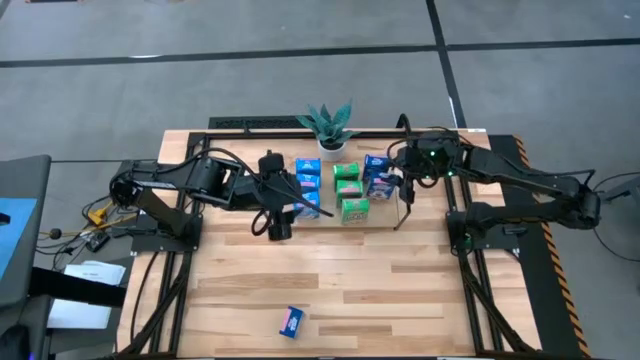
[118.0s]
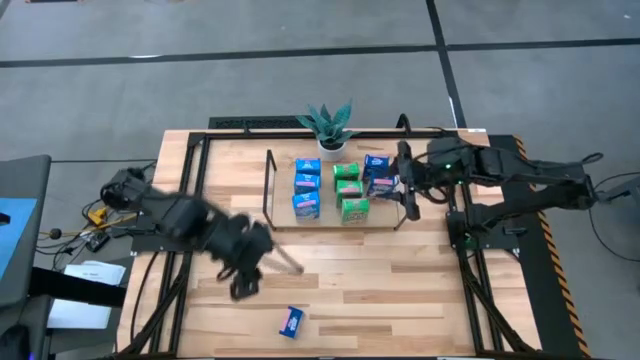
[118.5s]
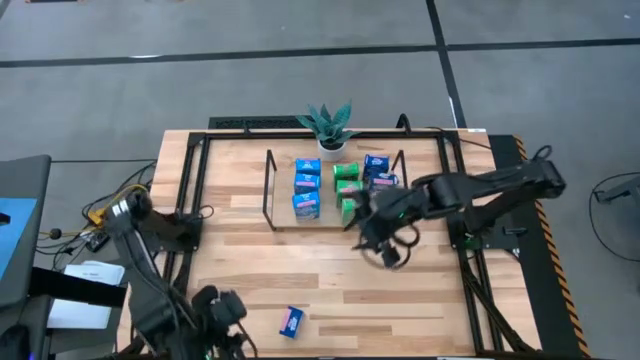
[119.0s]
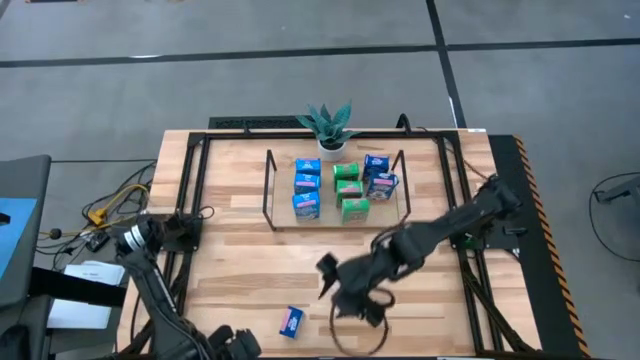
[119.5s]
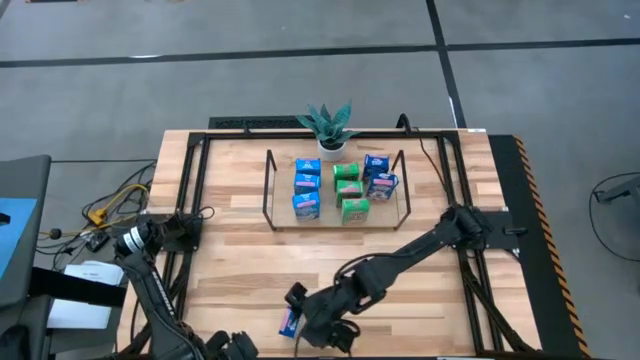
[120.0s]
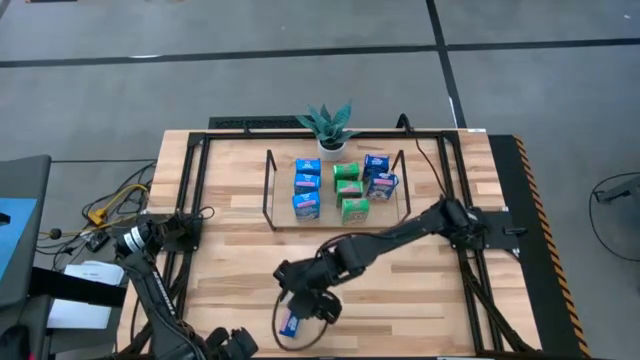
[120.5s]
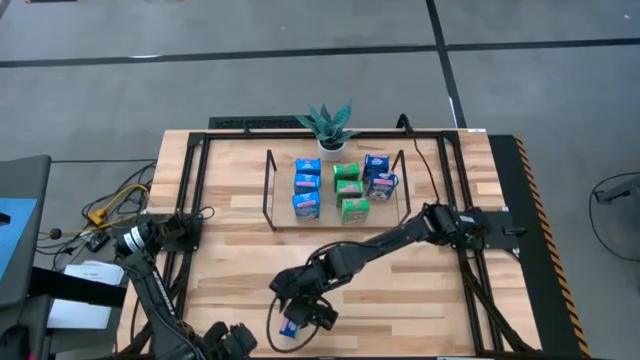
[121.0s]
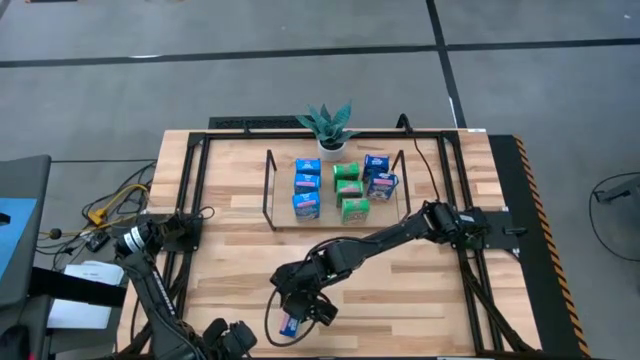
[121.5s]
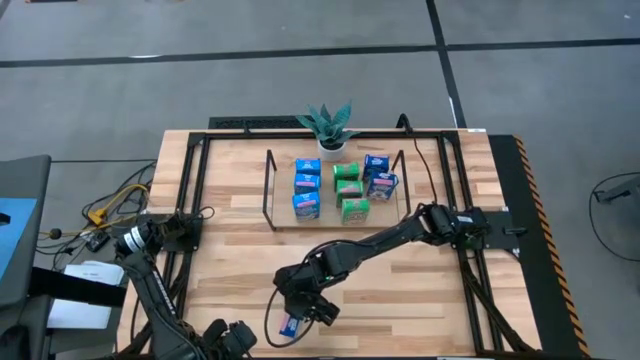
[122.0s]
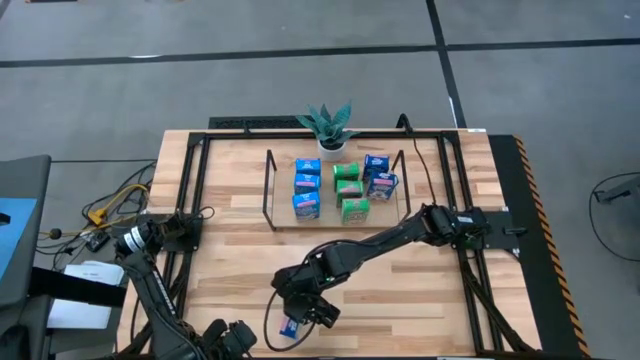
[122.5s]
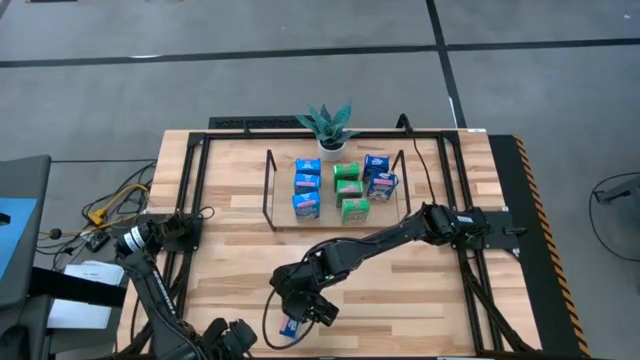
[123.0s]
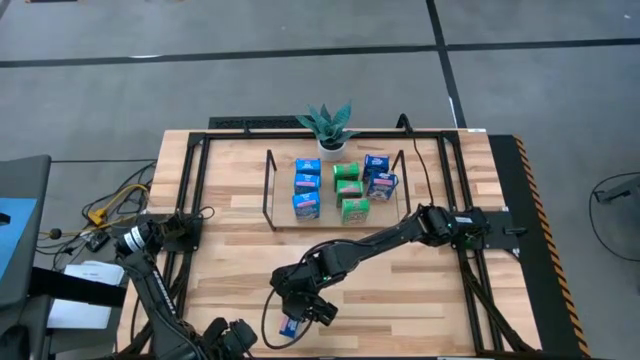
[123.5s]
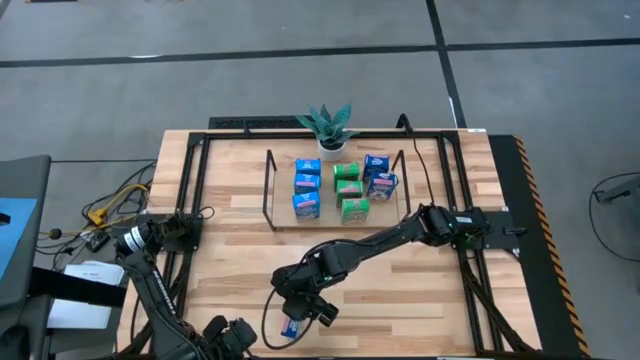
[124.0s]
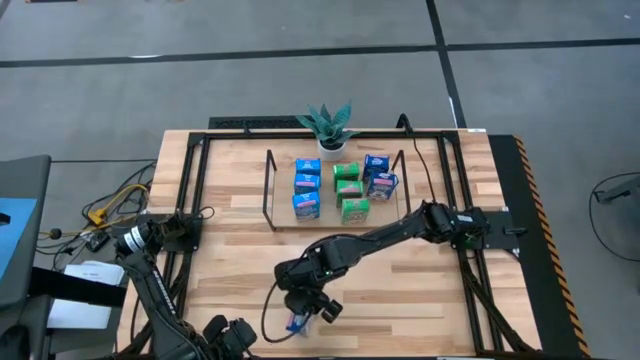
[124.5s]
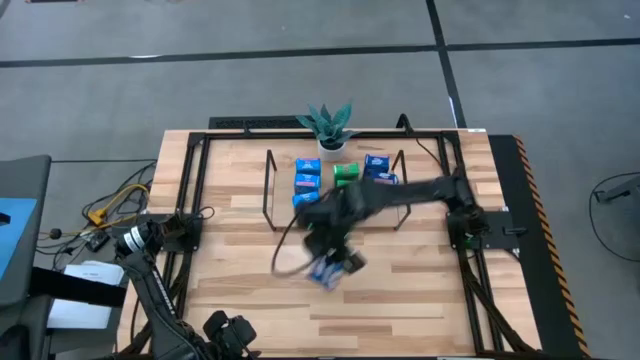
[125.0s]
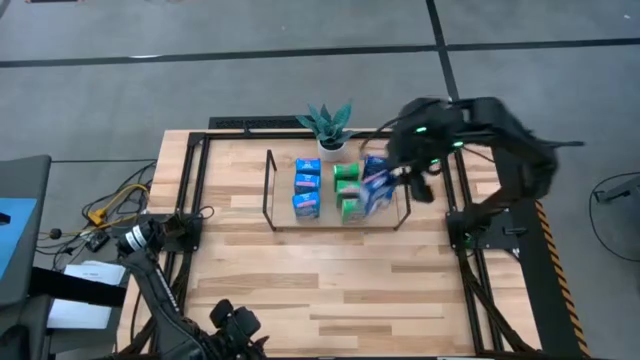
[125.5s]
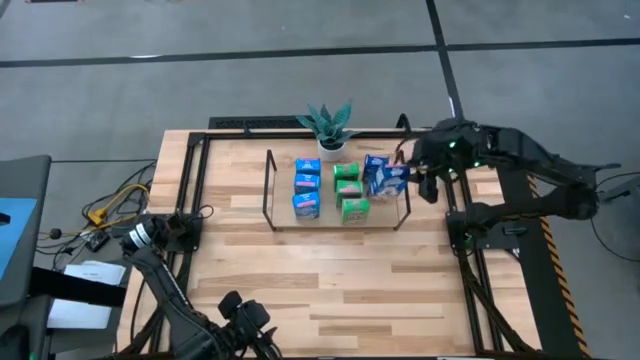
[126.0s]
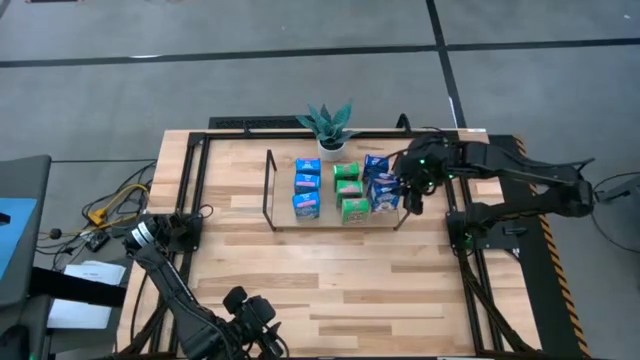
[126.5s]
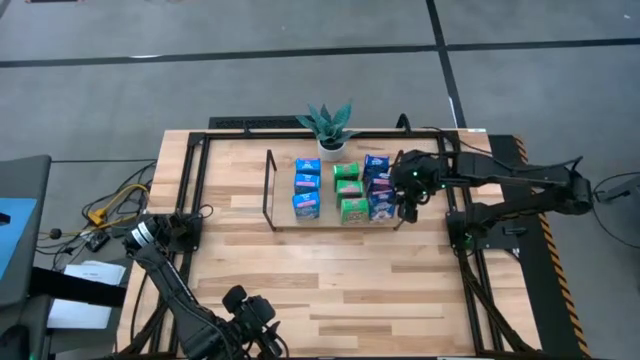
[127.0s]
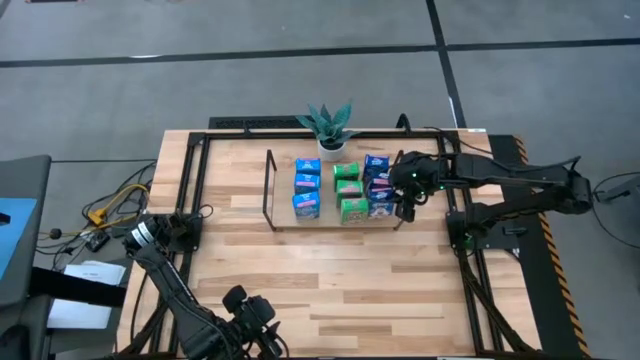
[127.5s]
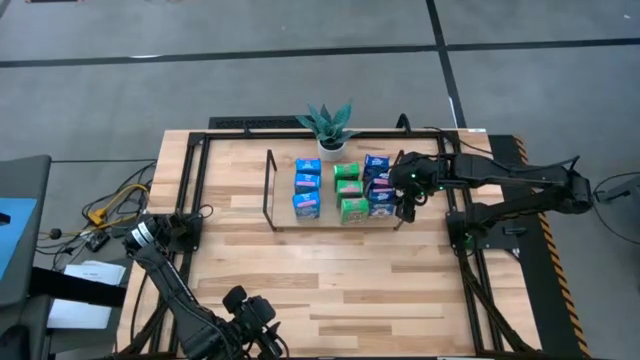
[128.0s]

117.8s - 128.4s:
Task: Stack cereal on shelf
Put the blue cereal box on the shelf aligned with the other blue cereal boxes

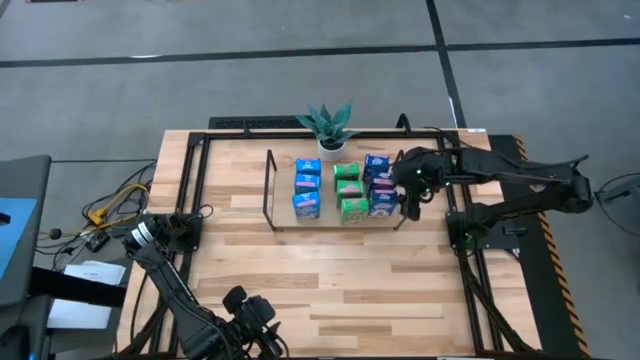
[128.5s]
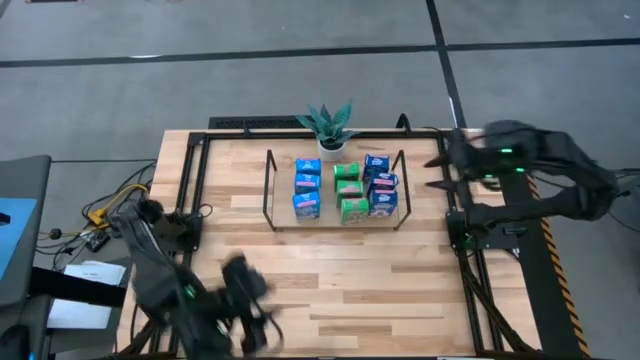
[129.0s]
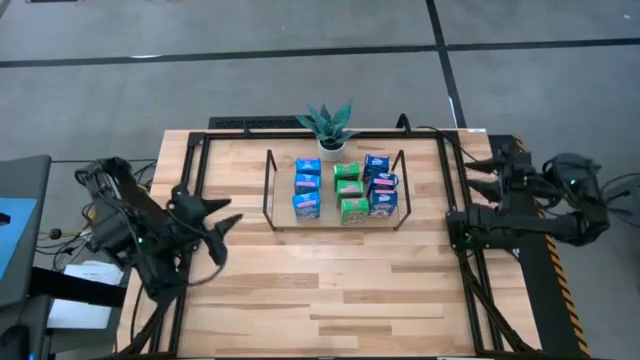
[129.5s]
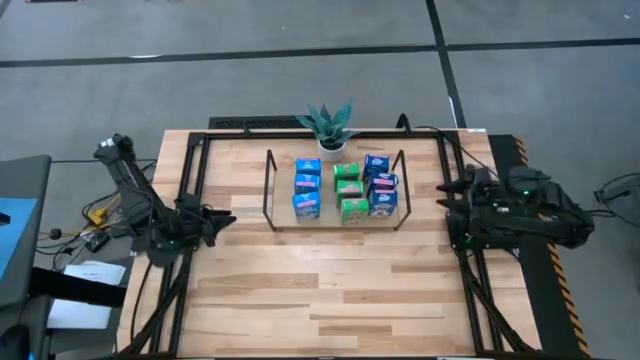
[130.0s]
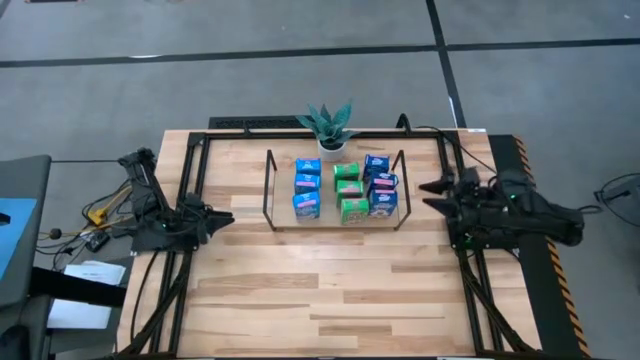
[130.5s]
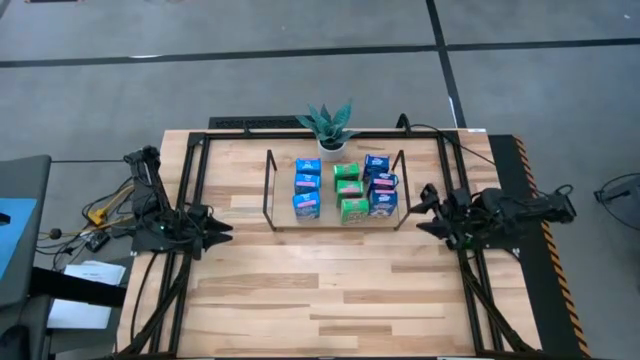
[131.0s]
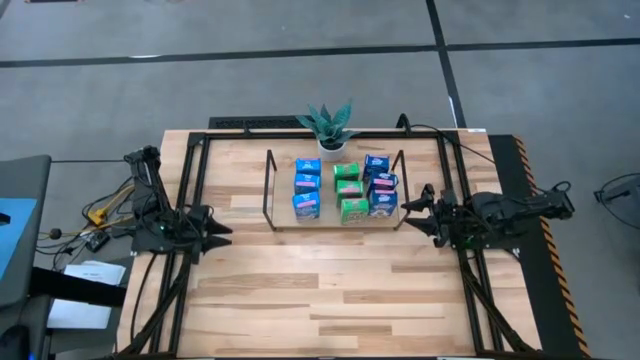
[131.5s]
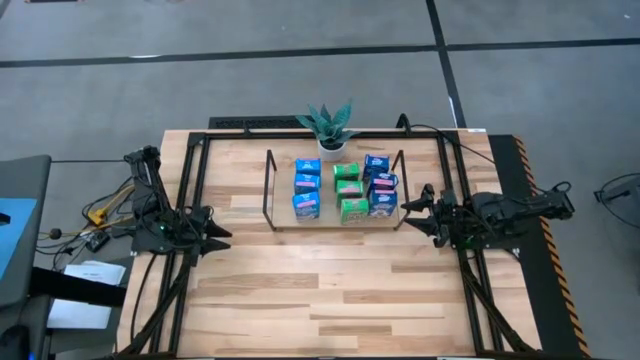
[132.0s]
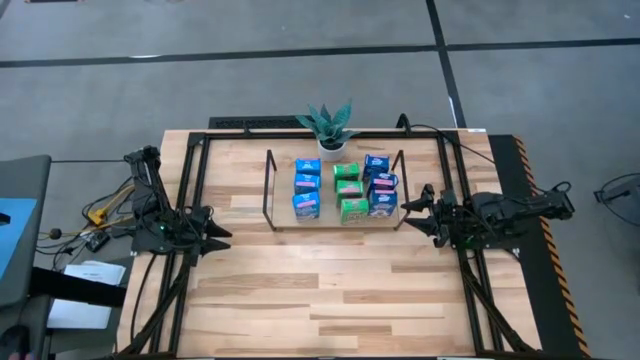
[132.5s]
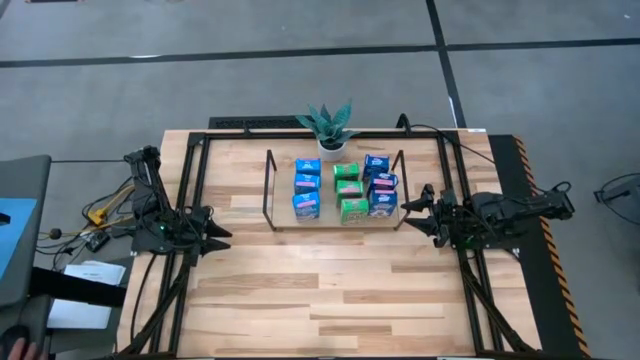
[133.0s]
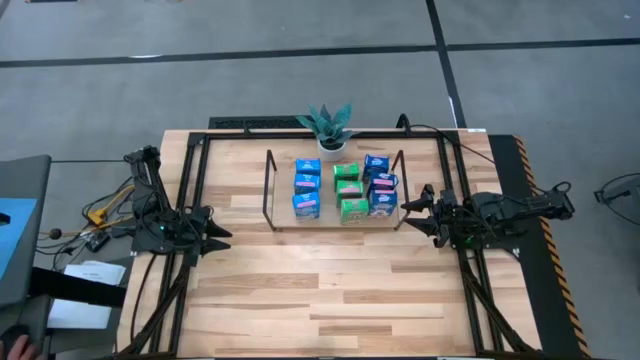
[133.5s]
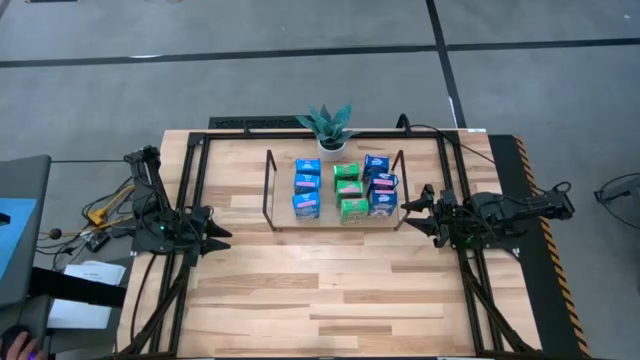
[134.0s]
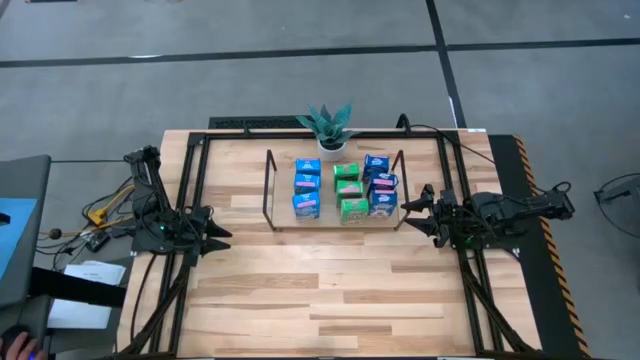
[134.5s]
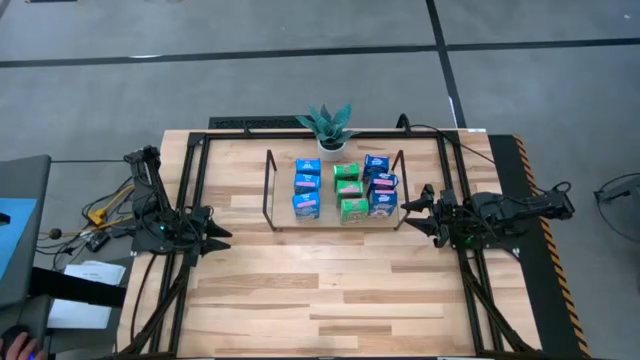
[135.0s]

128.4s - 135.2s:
Return to Home Position

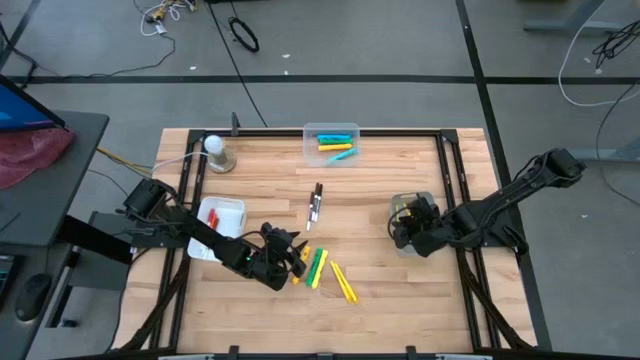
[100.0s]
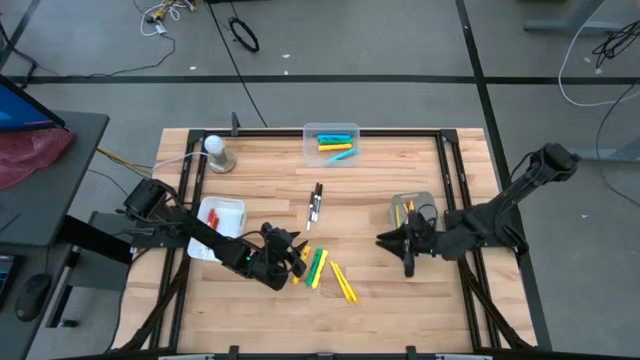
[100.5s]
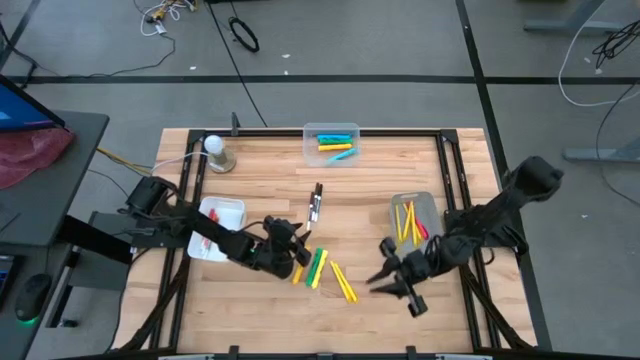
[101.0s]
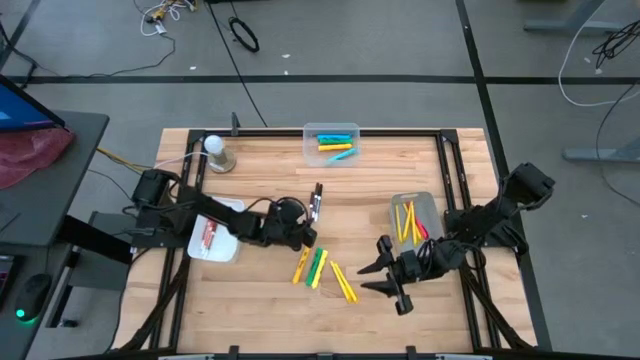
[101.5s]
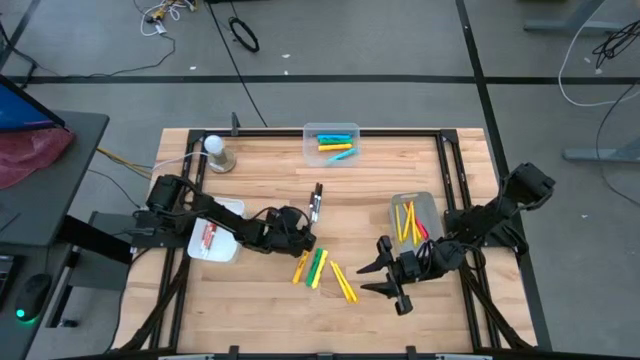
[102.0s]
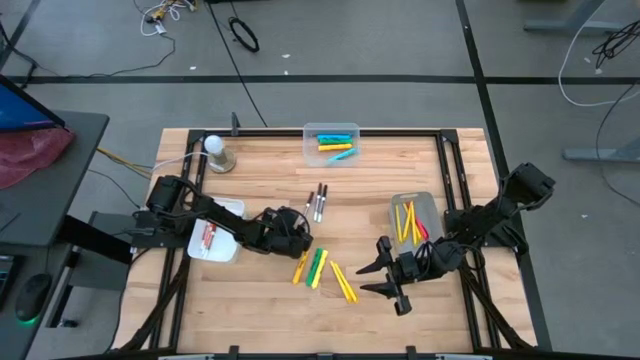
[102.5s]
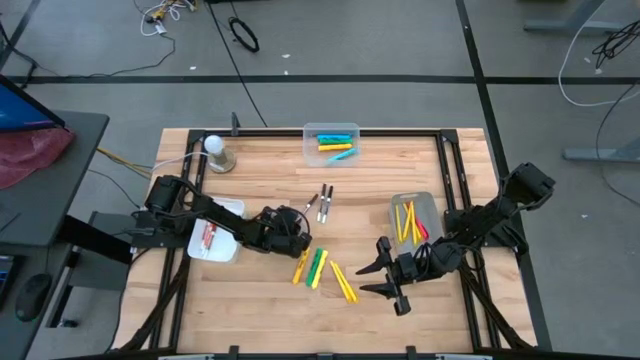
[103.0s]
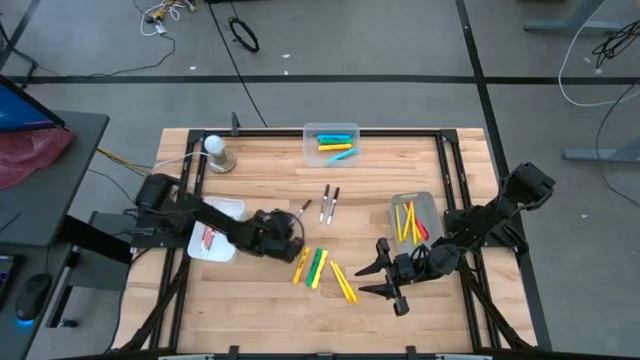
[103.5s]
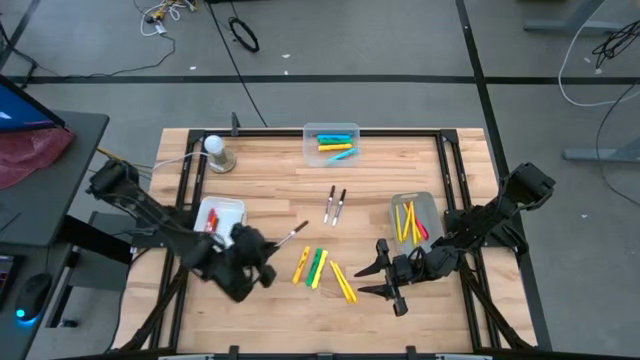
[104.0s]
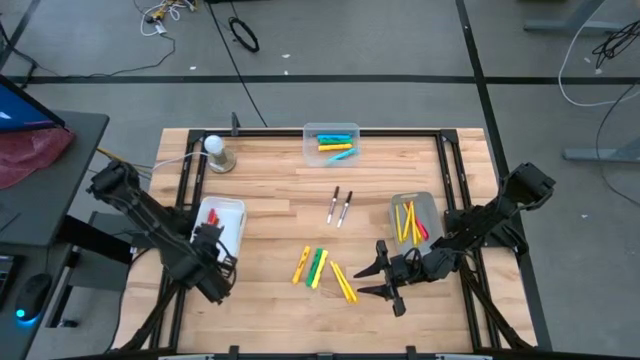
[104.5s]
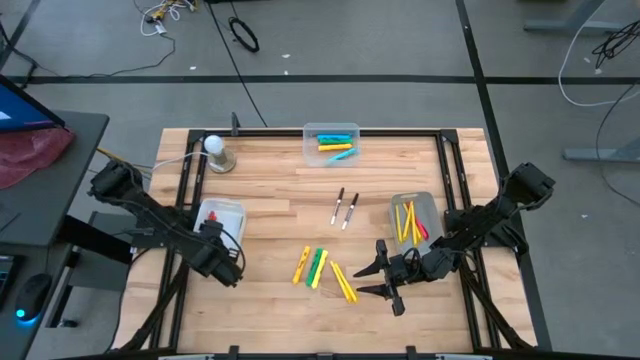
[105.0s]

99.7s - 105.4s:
Task: Pick & Place Markers
Put the dark brown marker pen into the white bin
